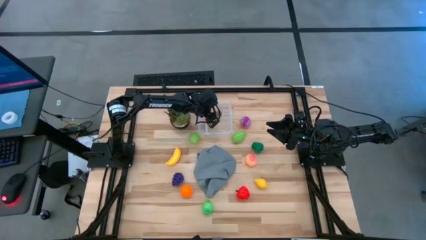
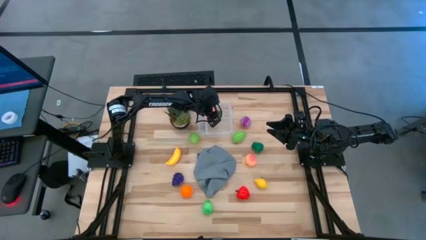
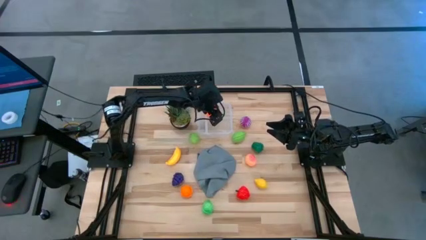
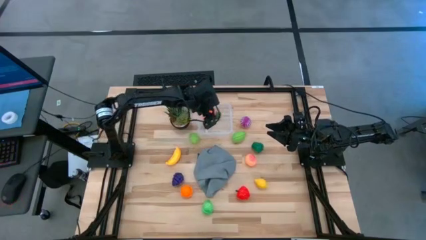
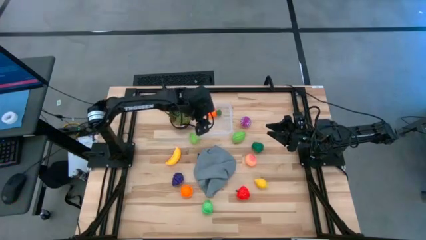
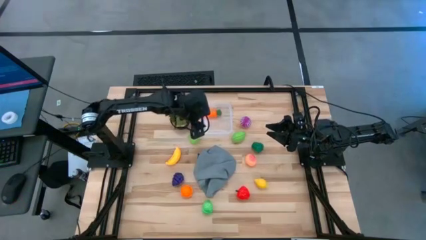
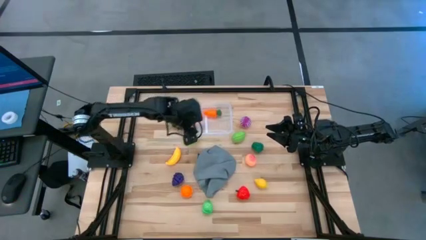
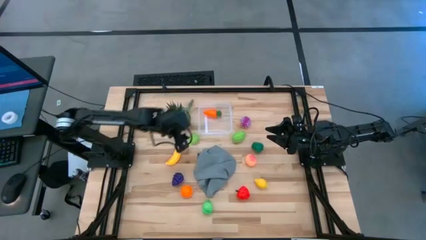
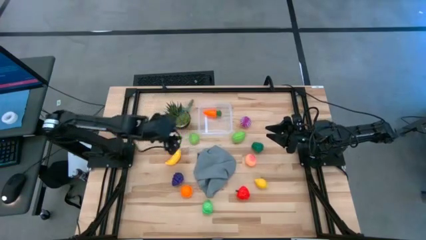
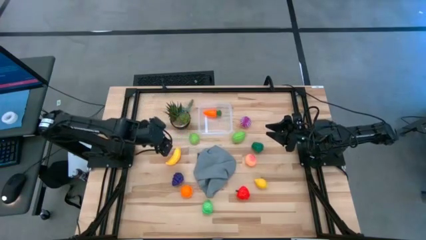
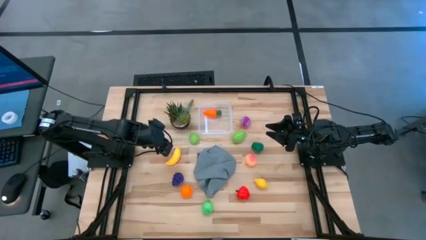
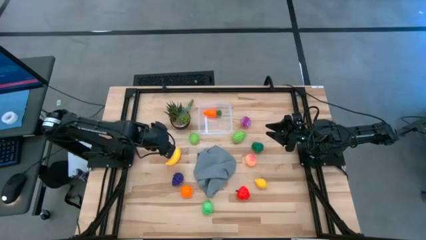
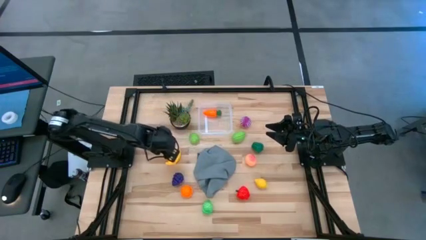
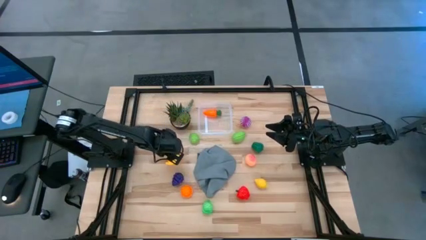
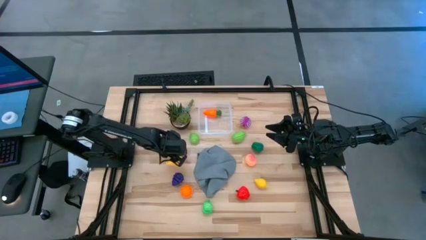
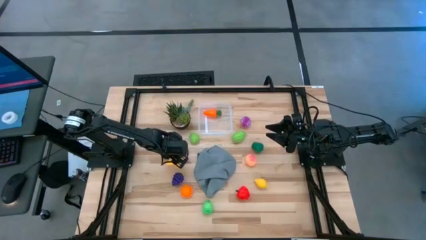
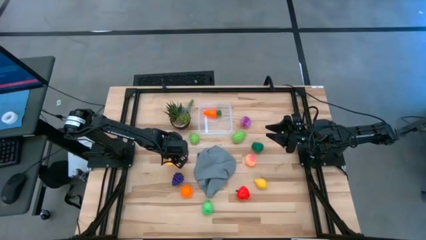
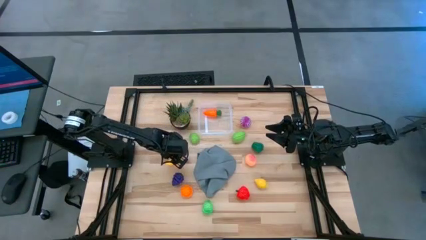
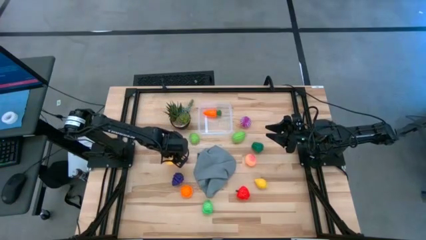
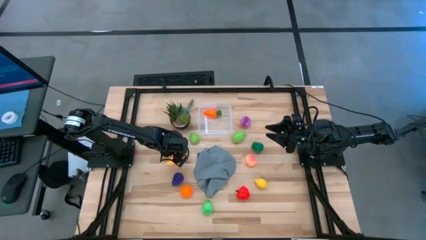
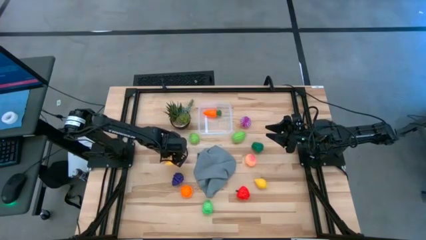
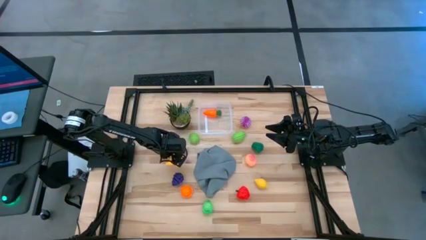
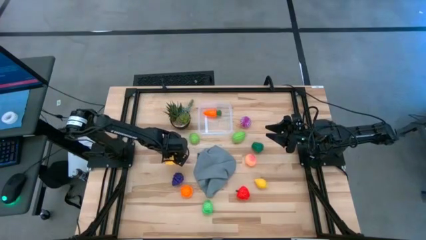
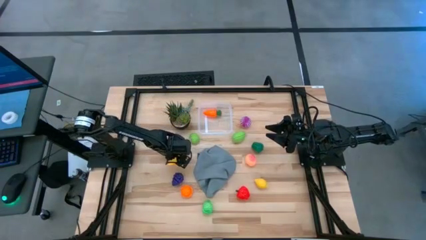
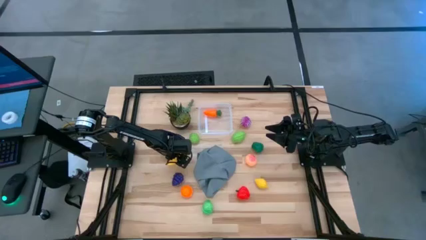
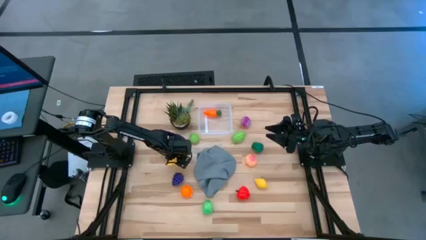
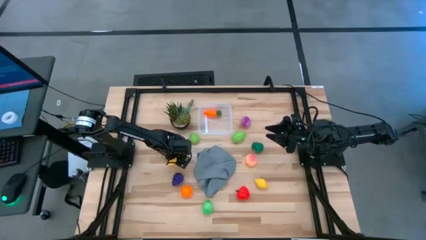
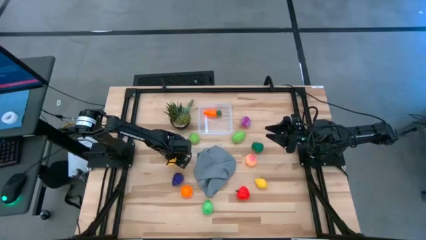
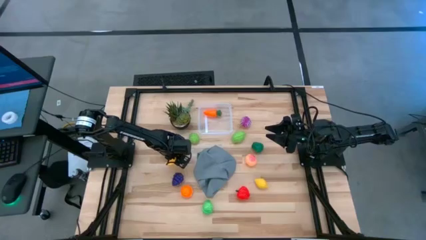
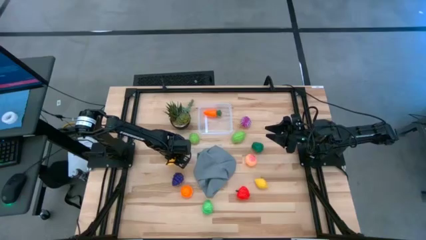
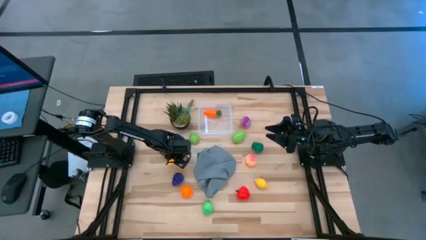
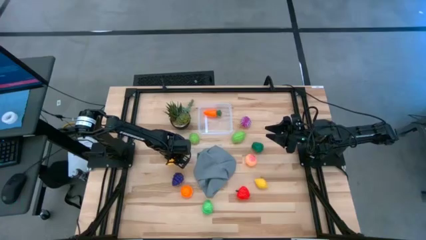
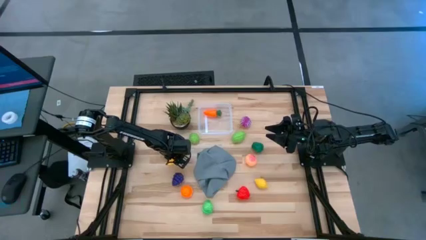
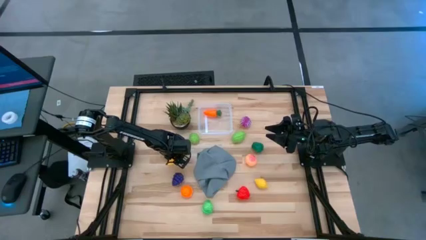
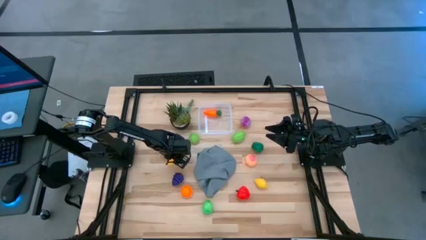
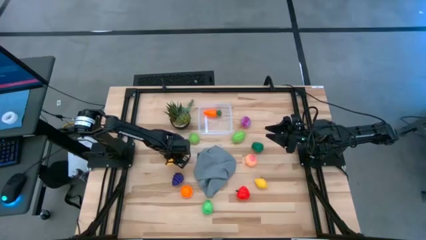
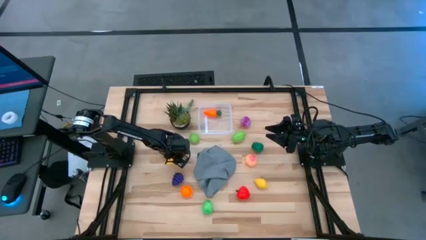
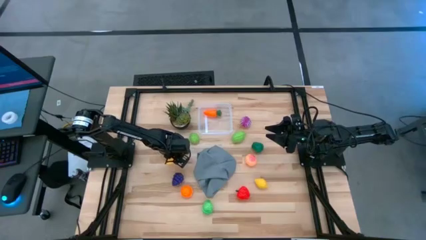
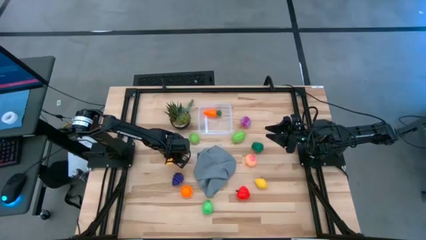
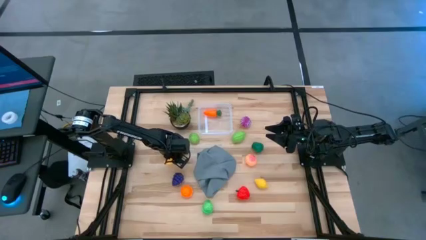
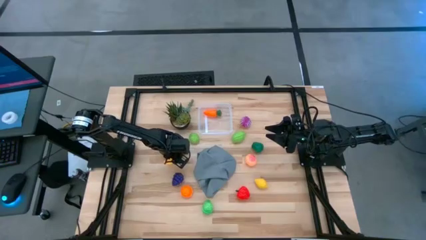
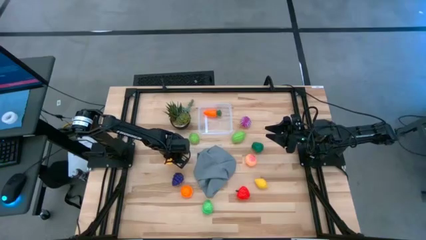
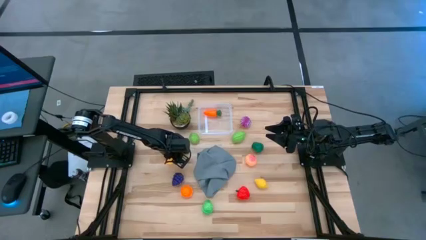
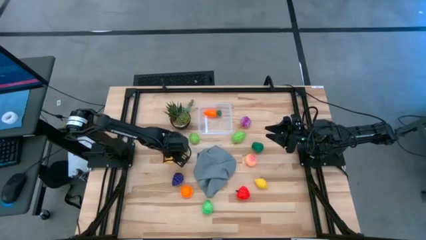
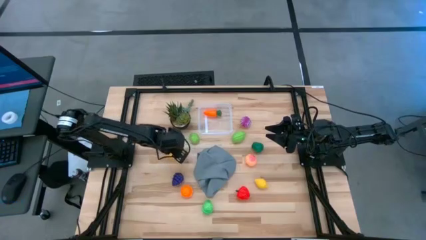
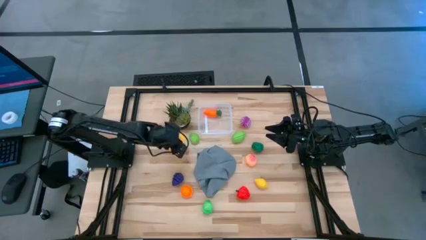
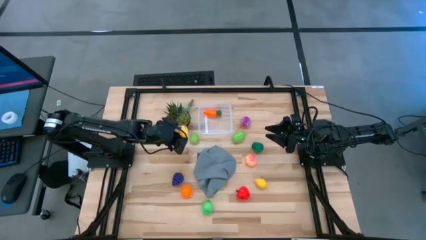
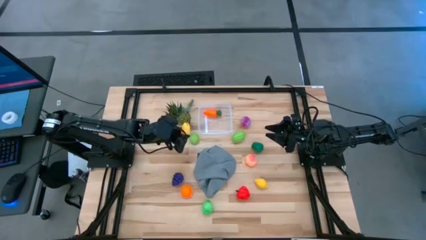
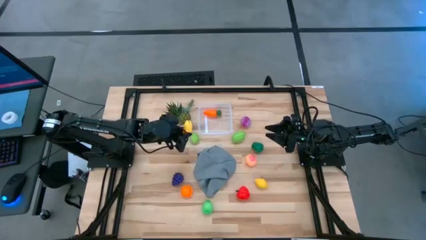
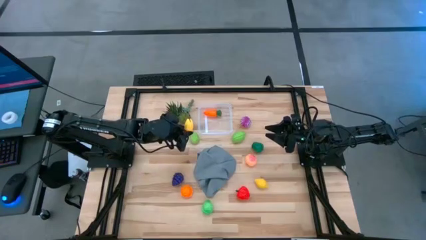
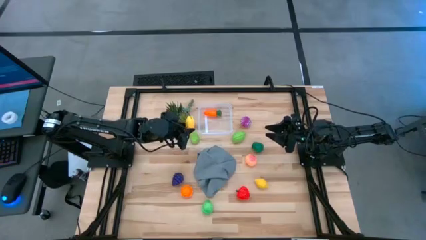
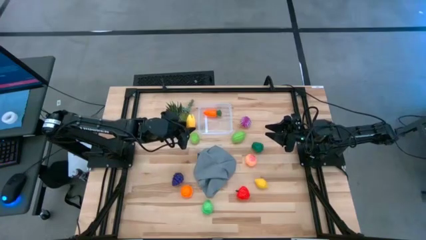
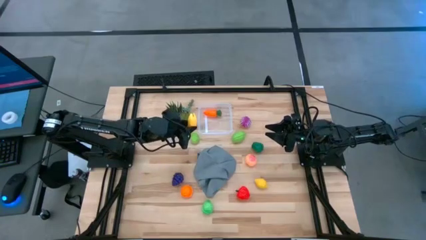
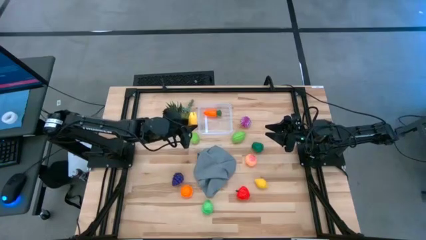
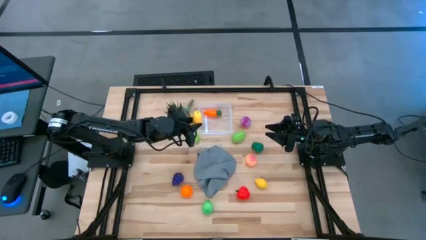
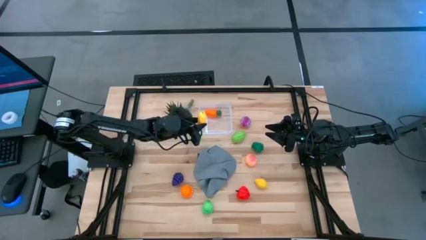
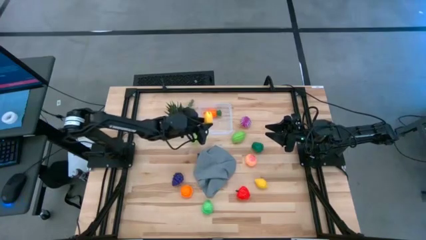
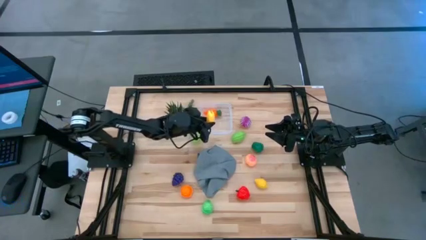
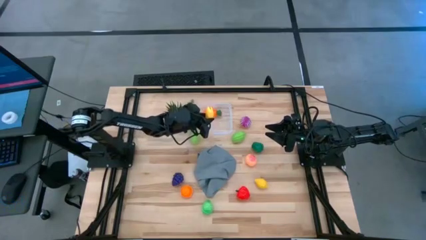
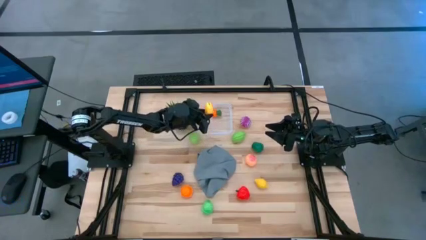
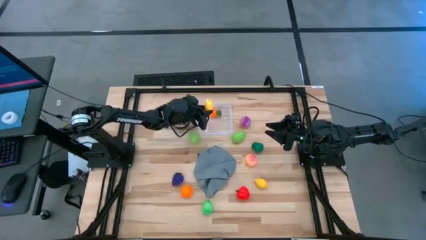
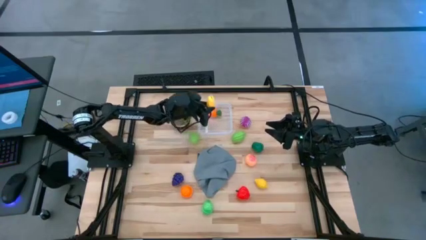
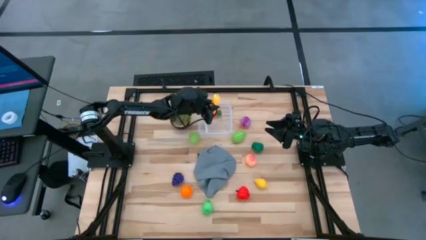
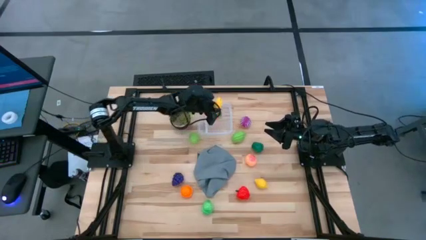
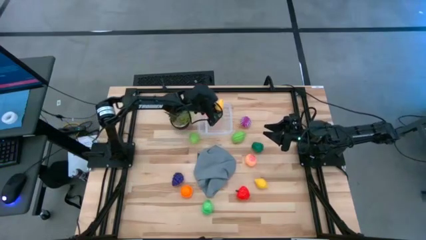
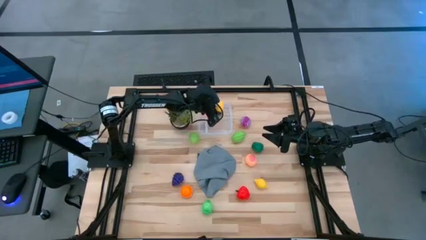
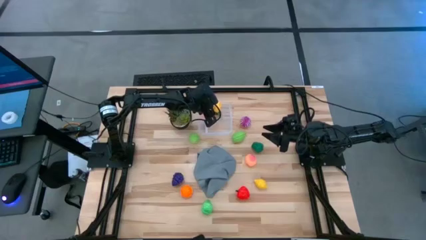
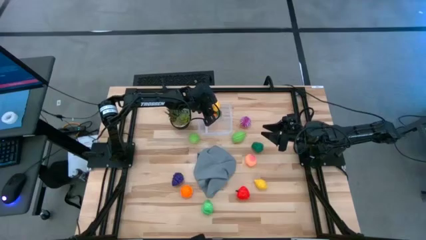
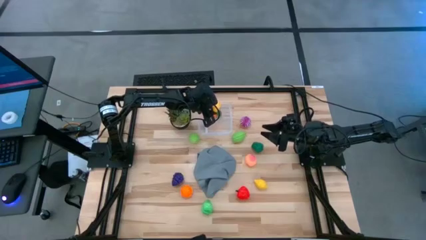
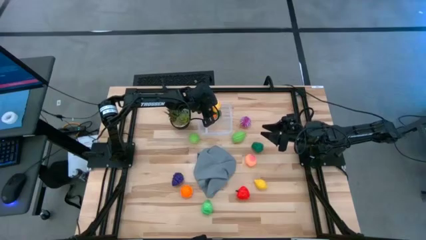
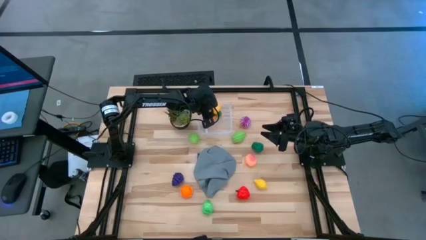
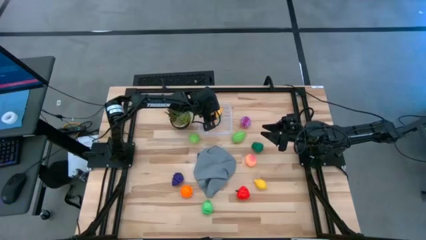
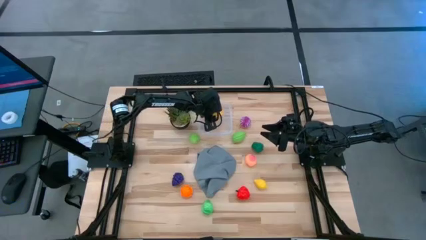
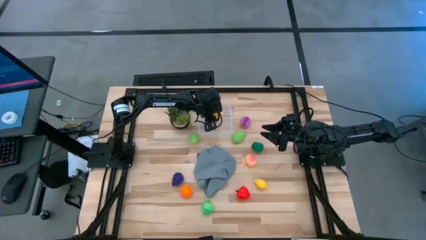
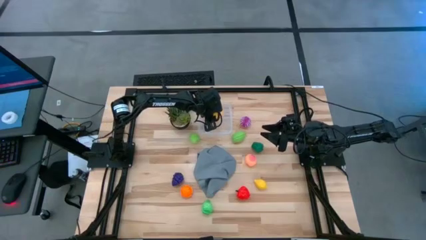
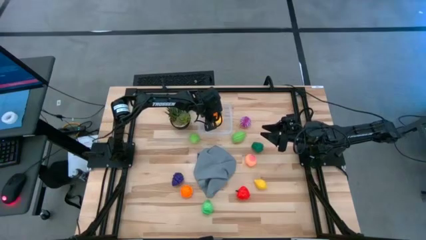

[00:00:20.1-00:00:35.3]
Task: Pick and placing Produce into tupperware
Put the yellow banana into the transparent container
